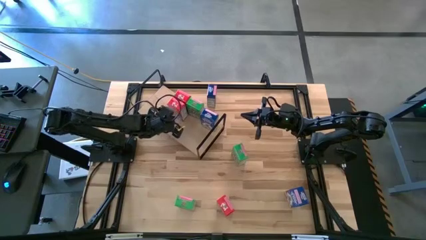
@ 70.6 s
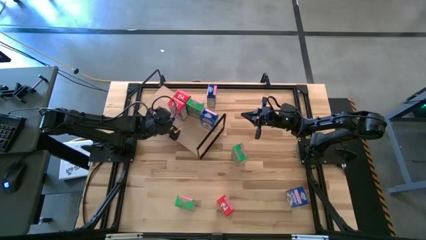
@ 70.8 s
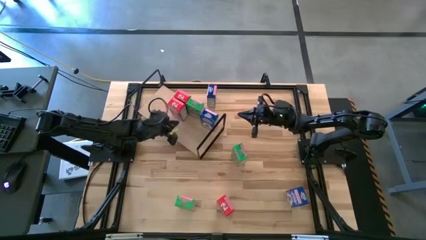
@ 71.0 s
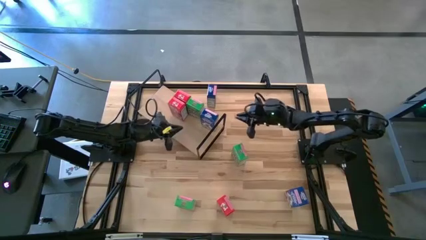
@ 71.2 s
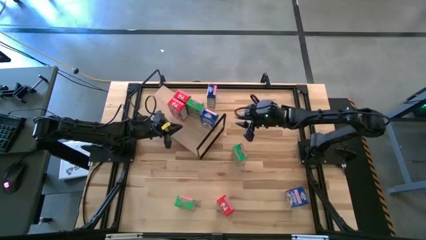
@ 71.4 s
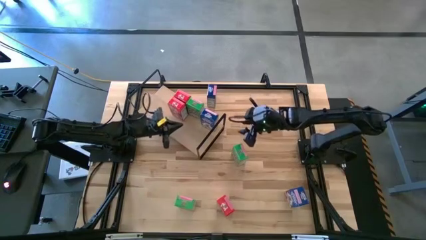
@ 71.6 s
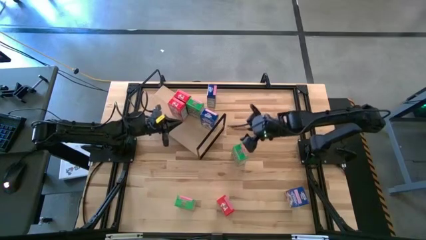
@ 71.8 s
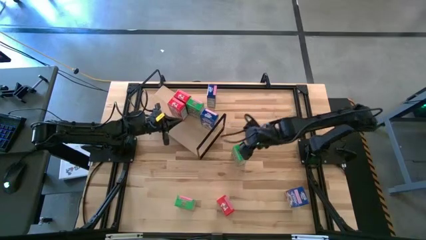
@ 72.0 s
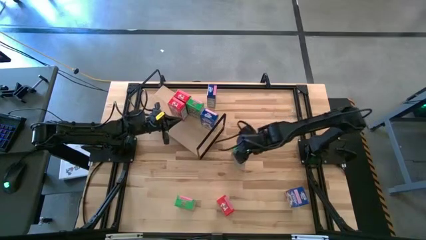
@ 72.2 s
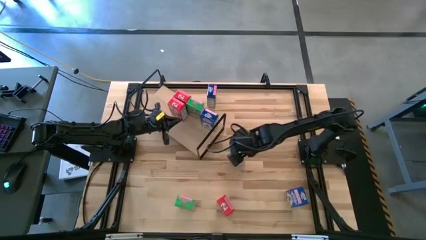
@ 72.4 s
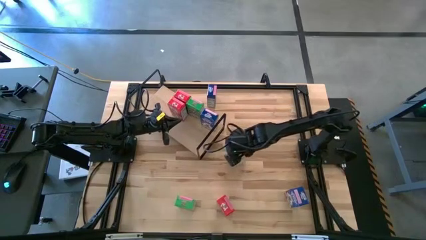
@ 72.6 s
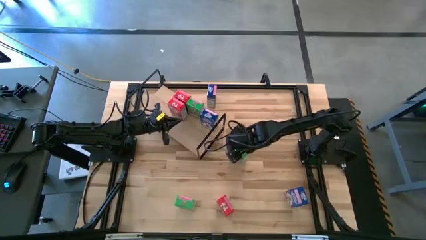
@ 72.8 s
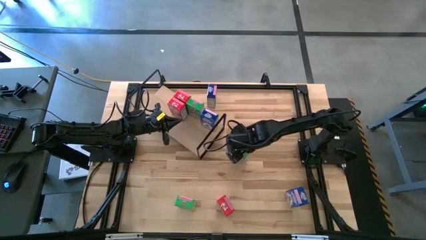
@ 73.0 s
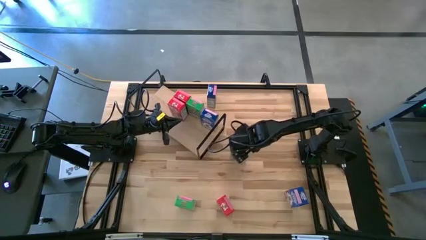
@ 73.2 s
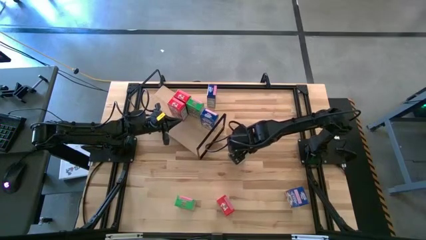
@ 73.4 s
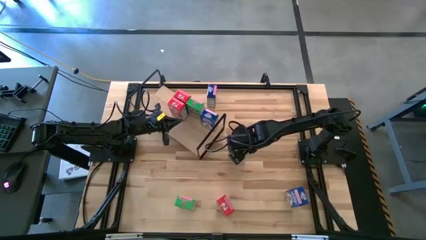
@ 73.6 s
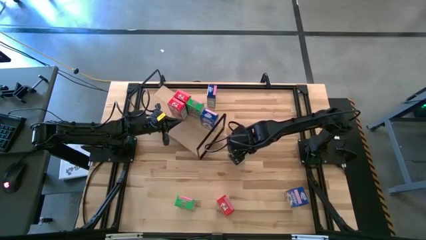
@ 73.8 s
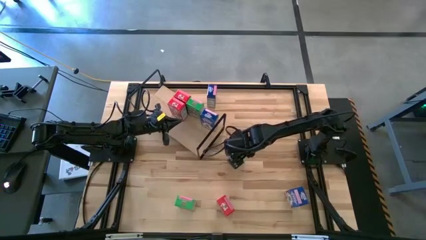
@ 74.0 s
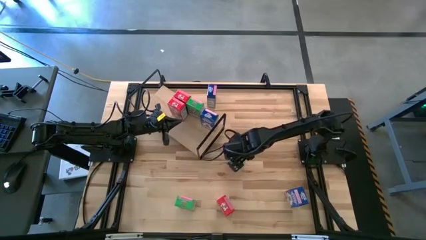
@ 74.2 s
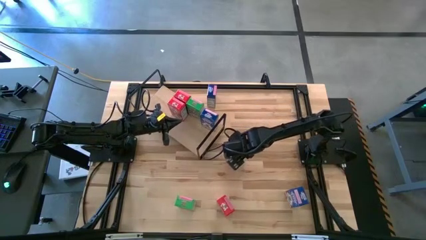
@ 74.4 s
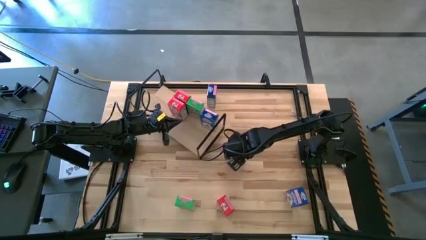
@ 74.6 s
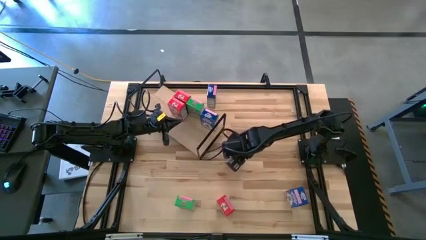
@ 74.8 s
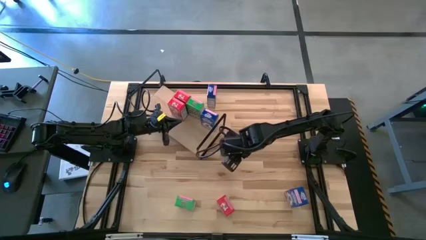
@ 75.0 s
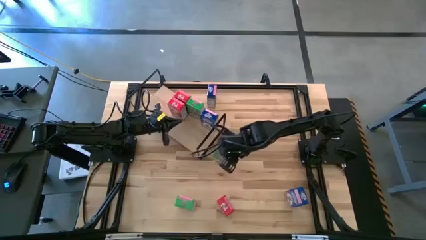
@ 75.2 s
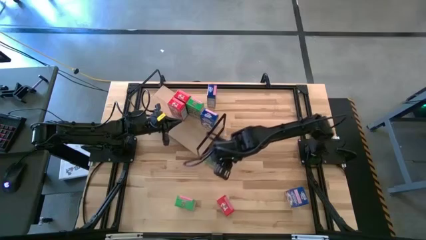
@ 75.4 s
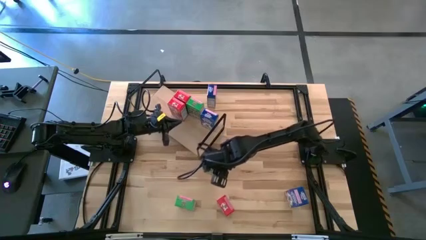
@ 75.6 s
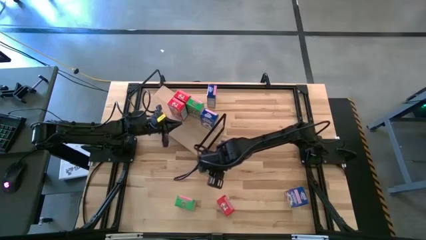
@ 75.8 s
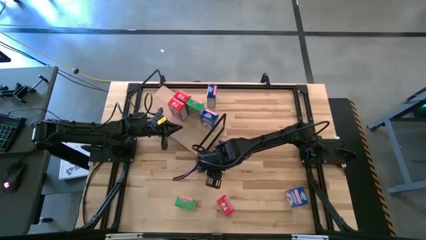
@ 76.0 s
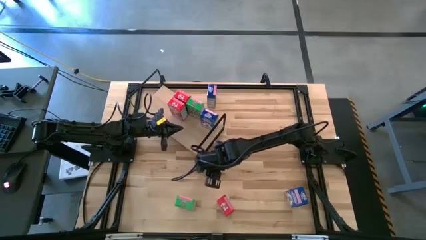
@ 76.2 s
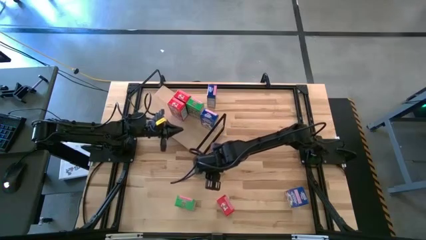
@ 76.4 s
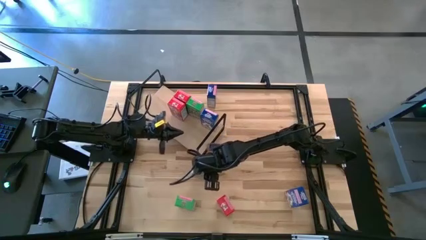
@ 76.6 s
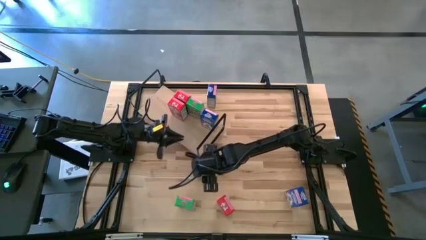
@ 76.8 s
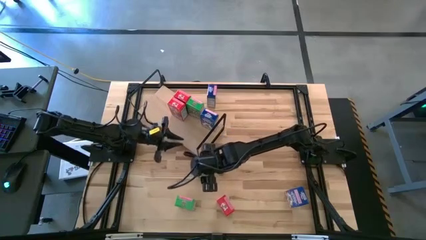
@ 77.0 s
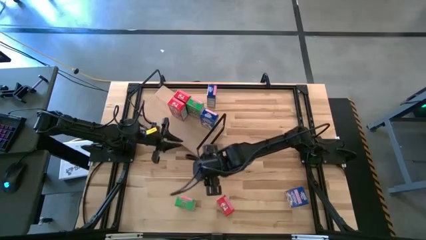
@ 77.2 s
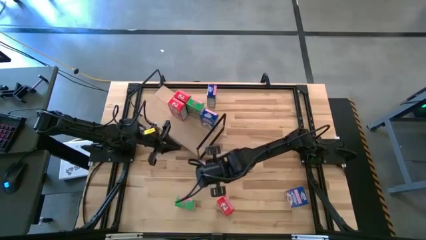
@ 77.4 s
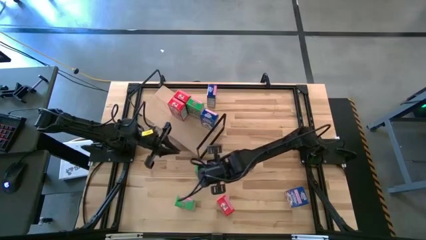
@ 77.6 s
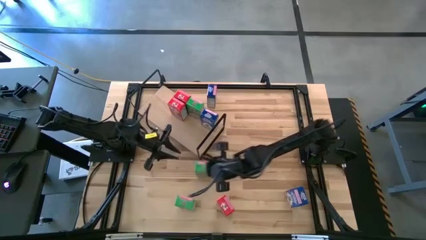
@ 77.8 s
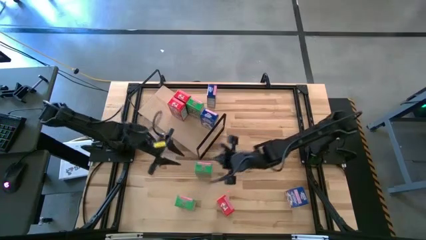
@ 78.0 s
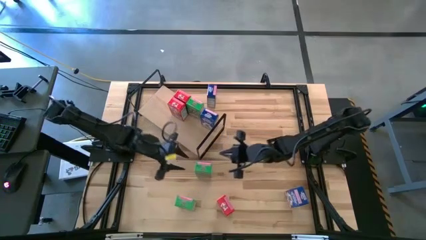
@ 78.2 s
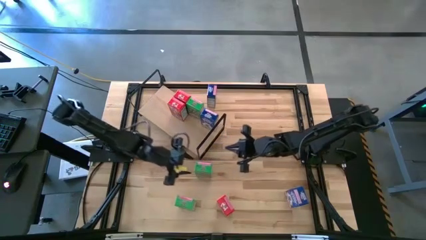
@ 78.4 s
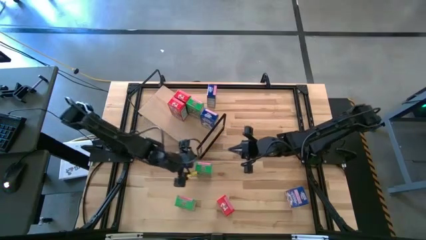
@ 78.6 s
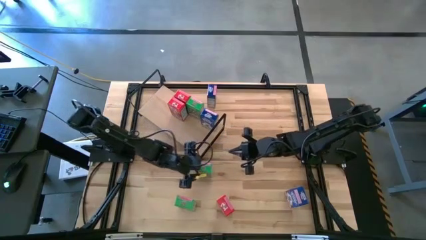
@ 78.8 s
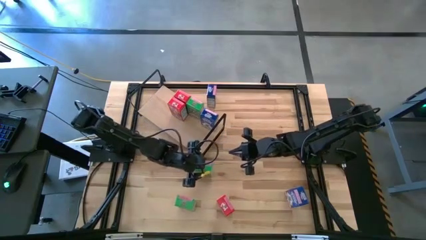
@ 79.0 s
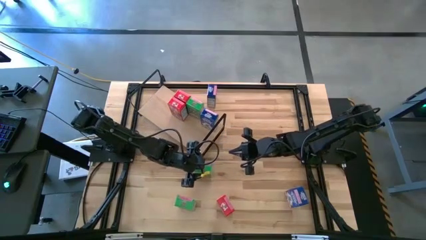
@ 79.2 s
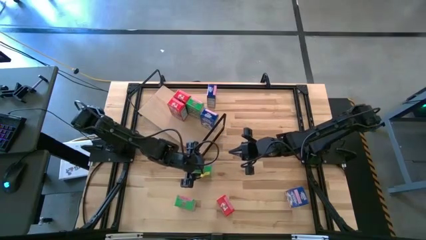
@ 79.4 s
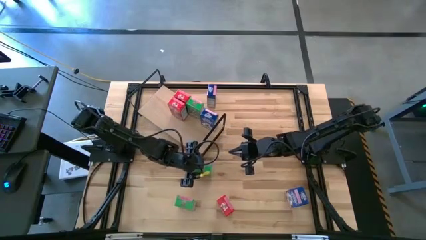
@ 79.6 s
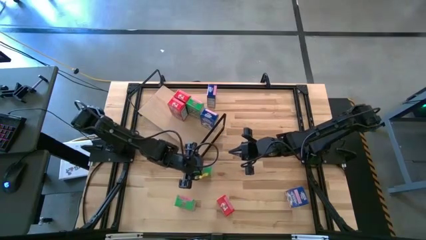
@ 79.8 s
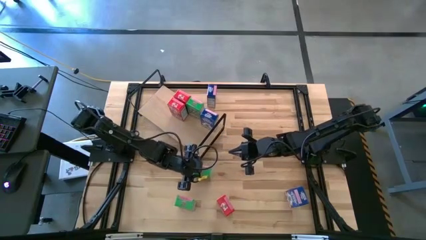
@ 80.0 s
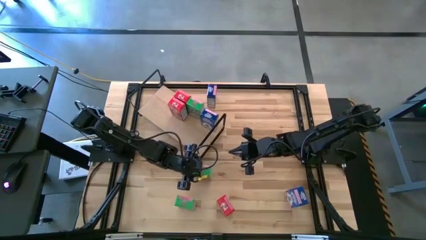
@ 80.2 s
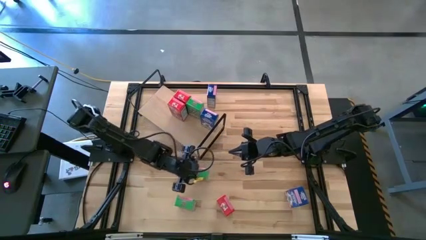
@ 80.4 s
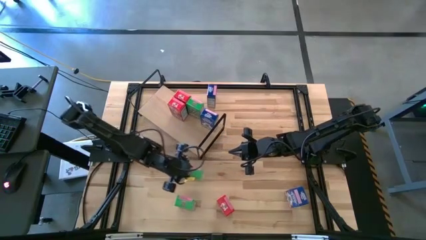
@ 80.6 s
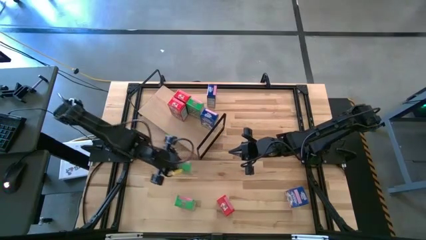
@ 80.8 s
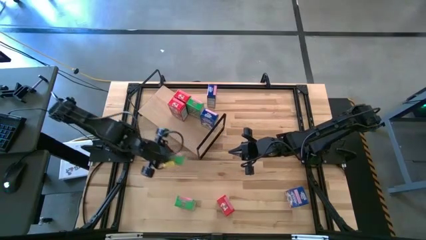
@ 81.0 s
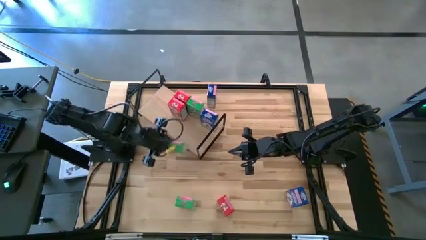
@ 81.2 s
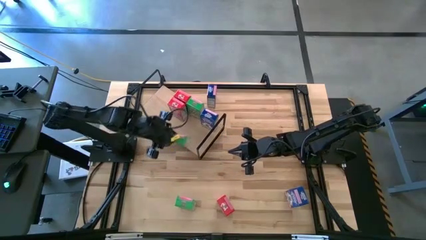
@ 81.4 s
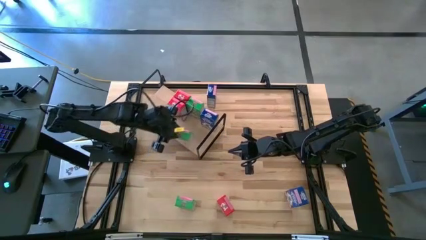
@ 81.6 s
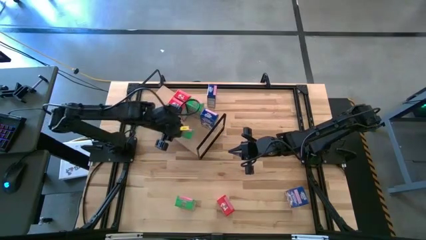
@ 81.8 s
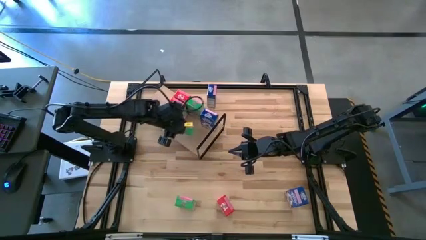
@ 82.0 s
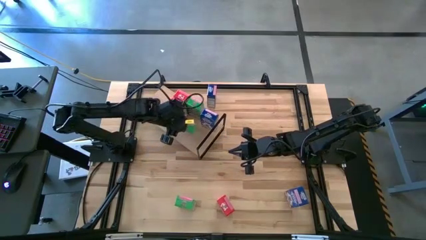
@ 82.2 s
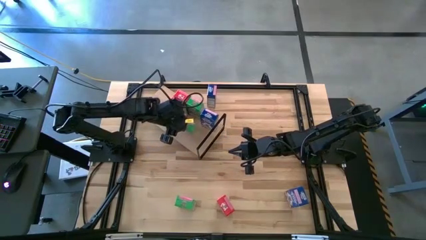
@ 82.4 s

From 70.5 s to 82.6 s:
Task: Stack cereal on shelf
Put the top green cereal on the shelf

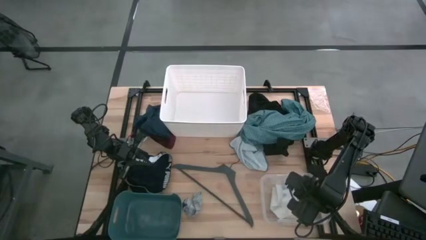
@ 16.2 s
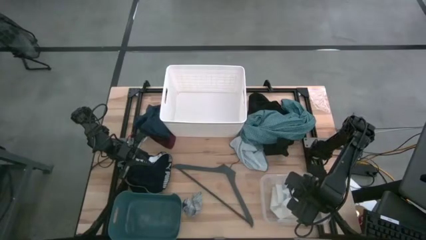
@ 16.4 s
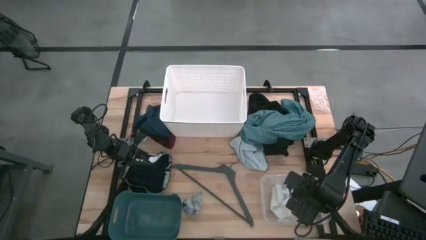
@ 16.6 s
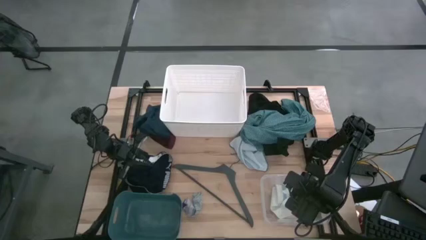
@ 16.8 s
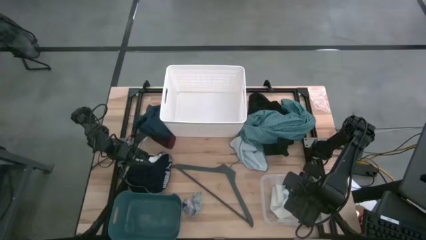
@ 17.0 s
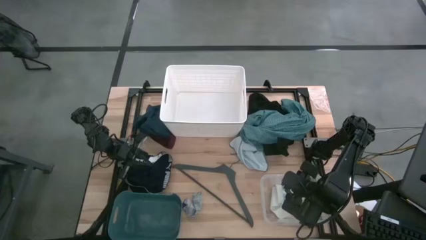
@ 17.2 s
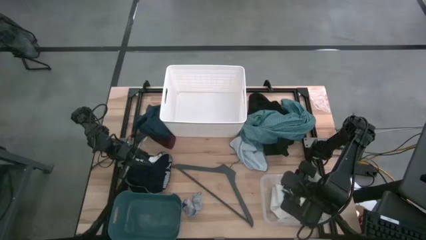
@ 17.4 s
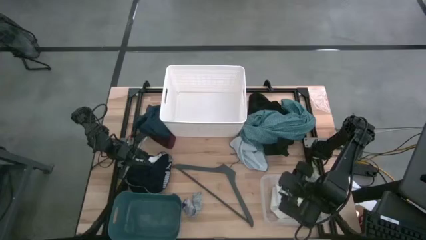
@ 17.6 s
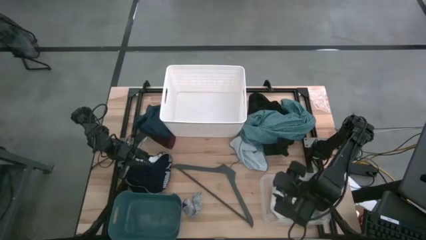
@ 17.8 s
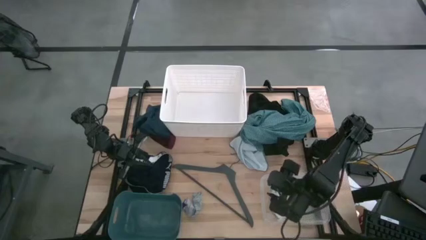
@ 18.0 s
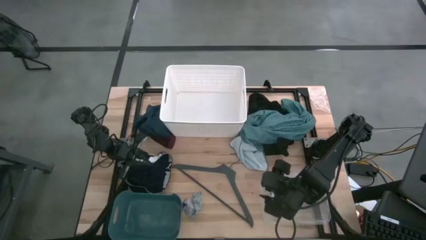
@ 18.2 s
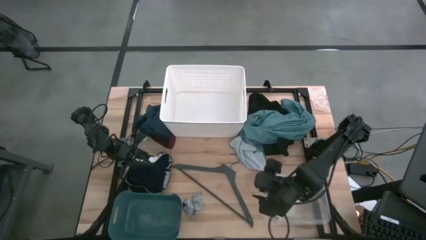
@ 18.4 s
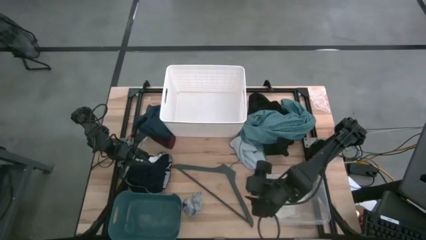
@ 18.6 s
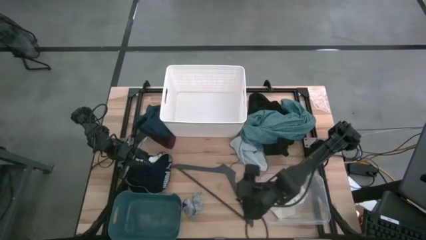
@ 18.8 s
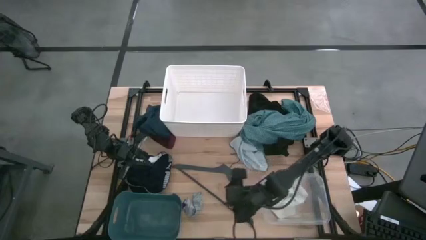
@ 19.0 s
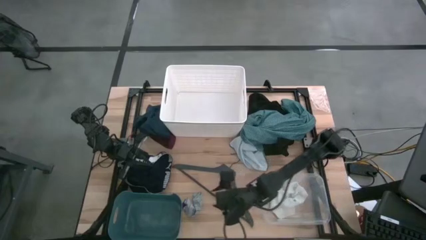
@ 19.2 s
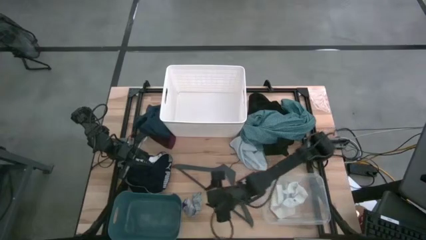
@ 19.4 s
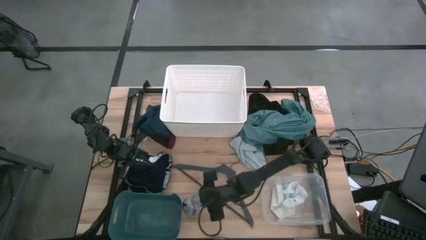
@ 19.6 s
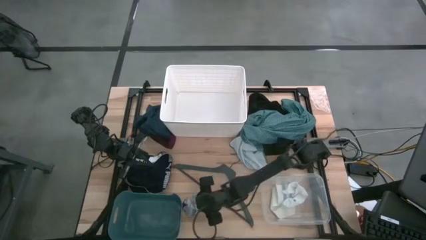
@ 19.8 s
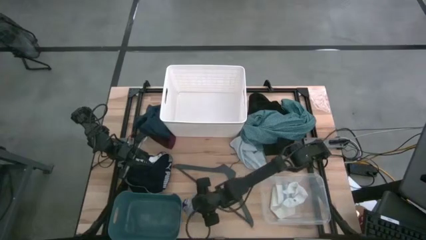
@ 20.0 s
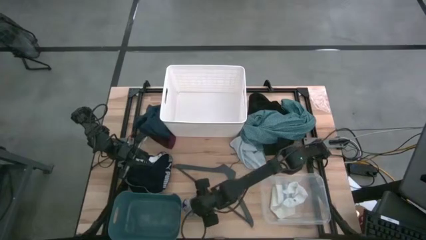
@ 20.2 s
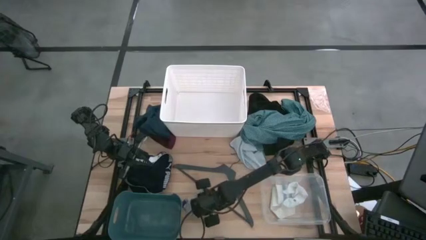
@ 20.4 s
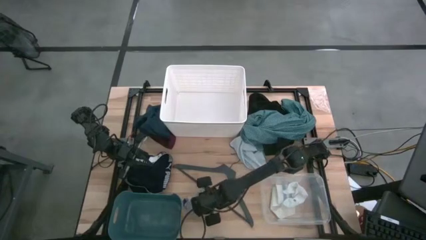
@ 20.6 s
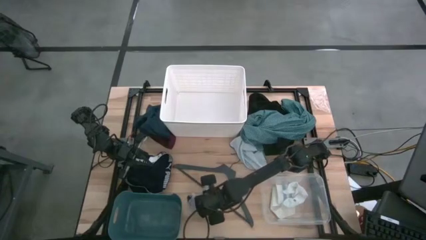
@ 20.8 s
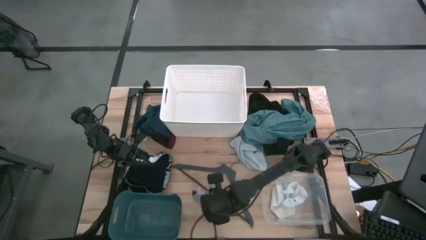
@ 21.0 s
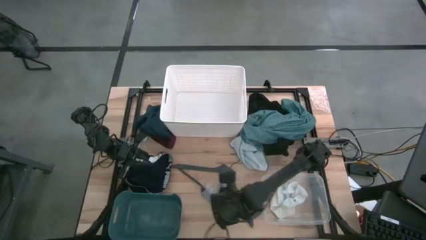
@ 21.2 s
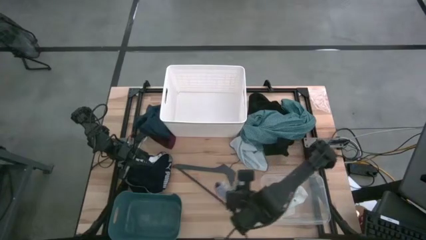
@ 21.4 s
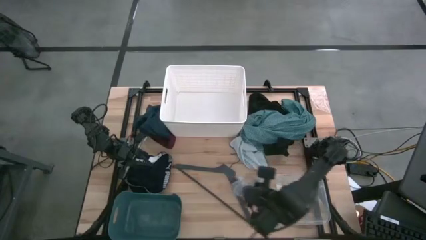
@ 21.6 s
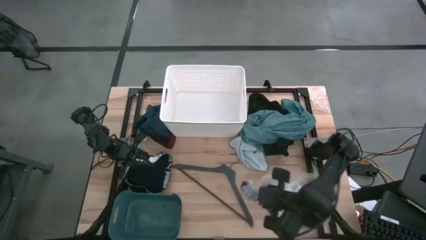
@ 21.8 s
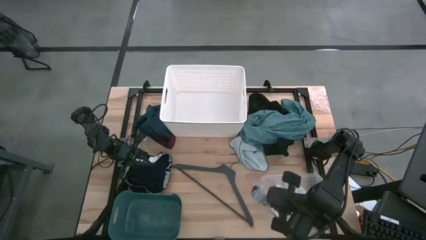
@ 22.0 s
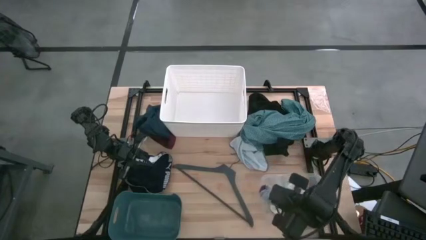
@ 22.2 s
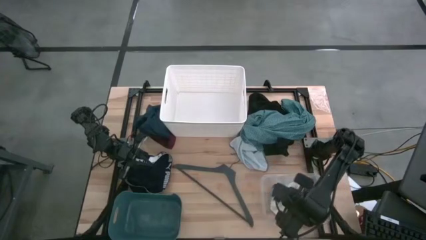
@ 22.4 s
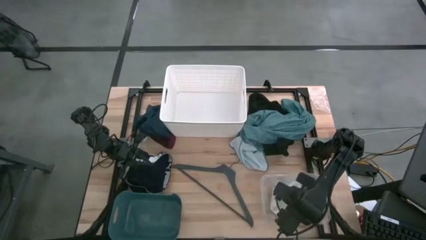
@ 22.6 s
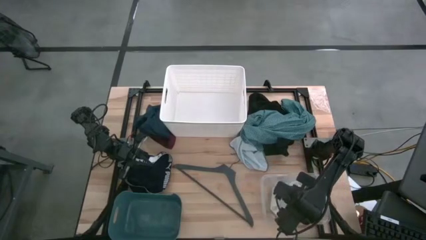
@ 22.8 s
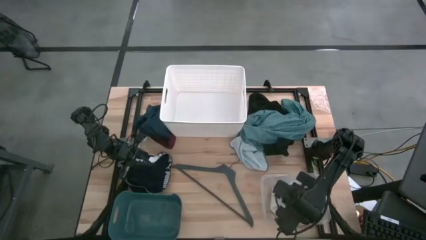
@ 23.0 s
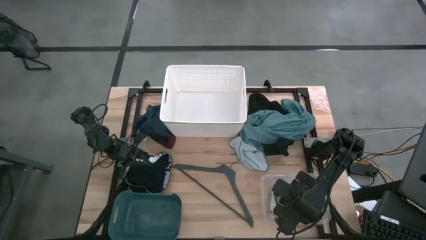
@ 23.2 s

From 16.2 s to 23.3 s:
Task: Pick & Place Cloths
Put the gray sock into the transparent bin
